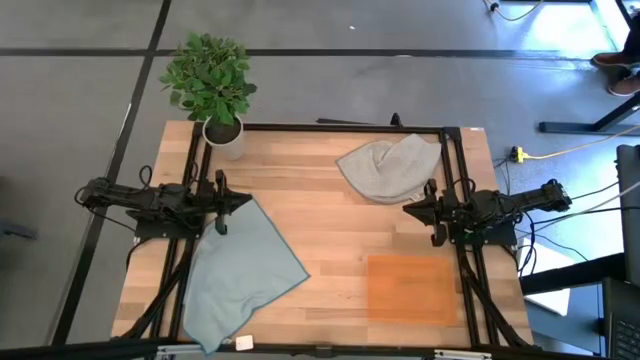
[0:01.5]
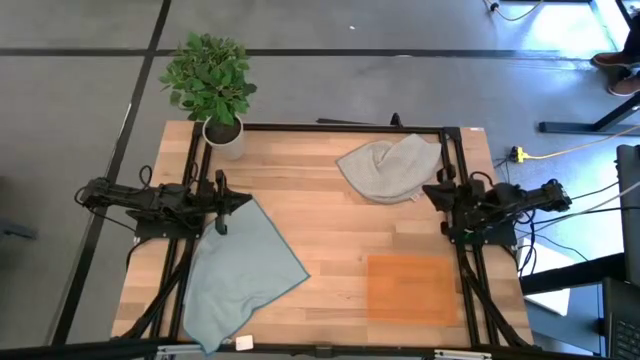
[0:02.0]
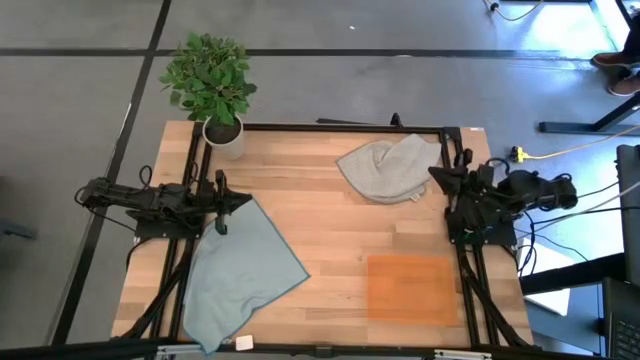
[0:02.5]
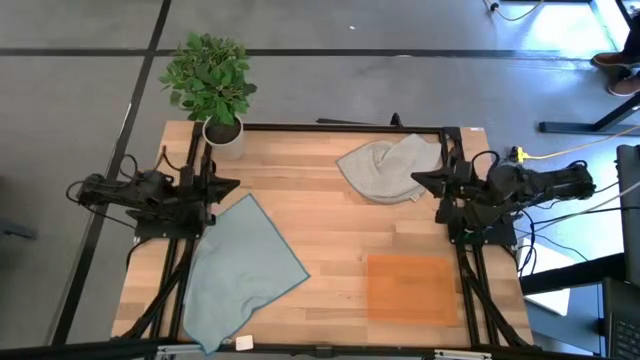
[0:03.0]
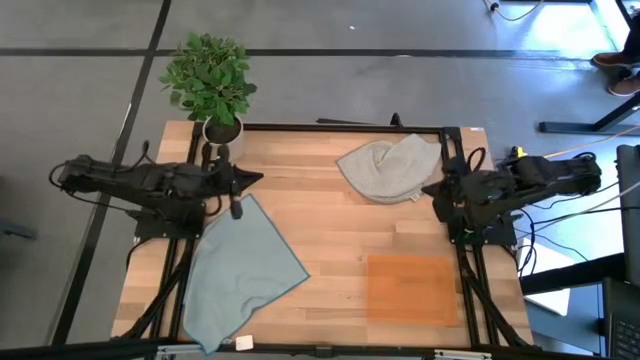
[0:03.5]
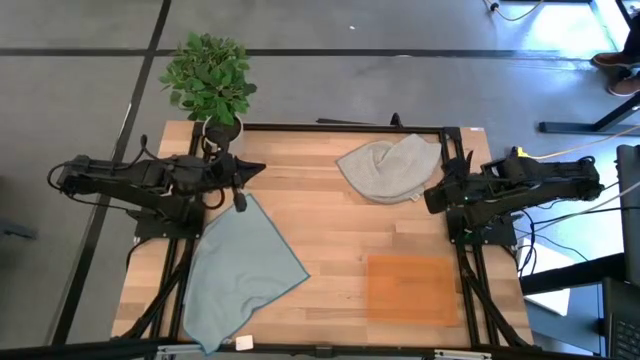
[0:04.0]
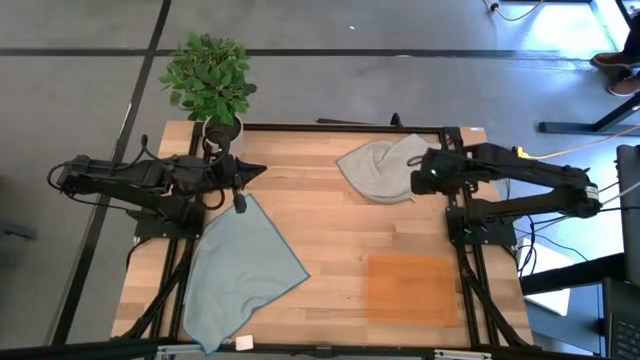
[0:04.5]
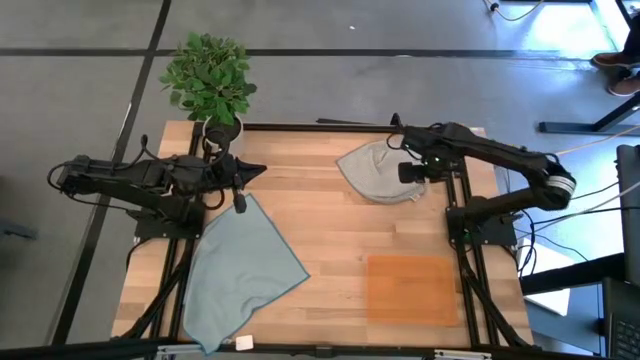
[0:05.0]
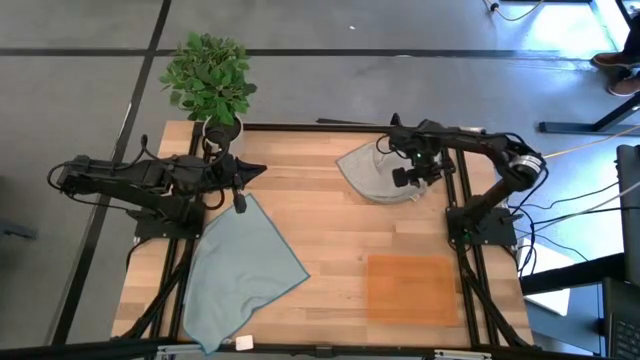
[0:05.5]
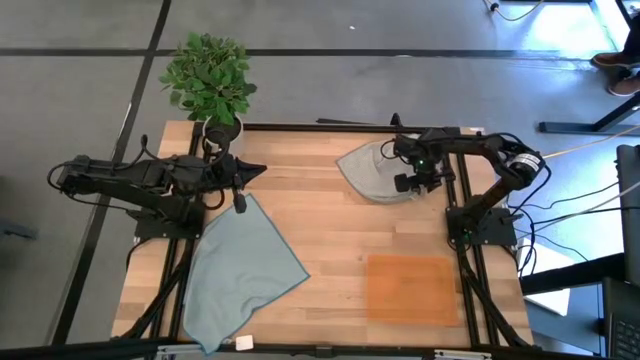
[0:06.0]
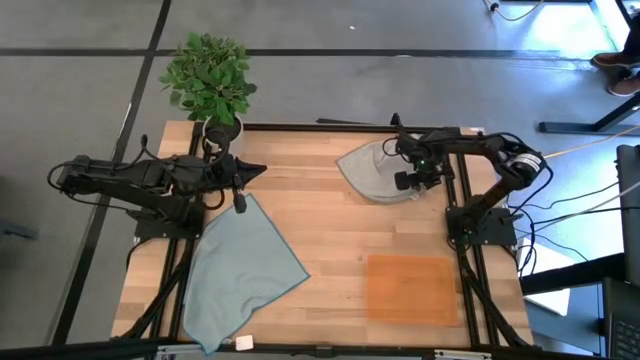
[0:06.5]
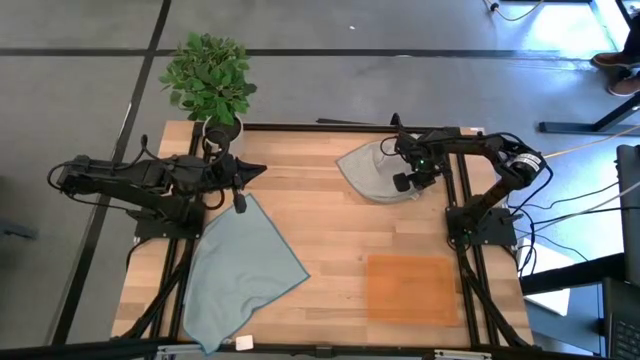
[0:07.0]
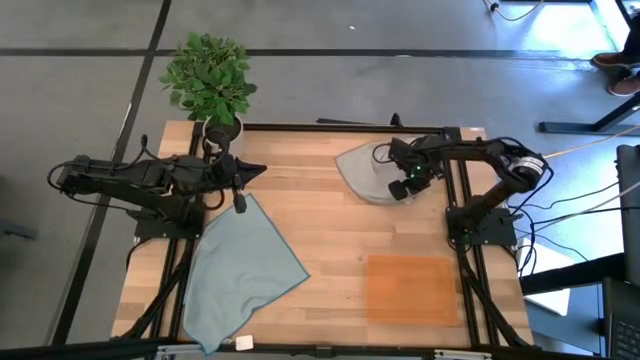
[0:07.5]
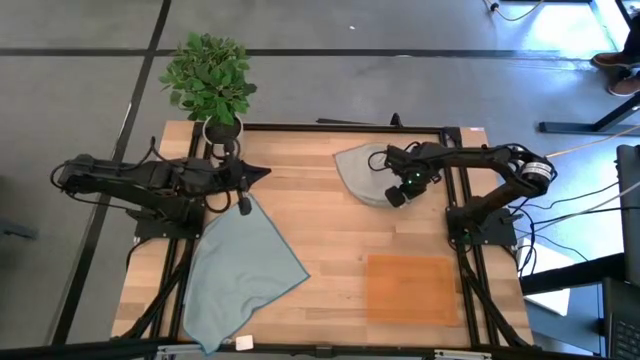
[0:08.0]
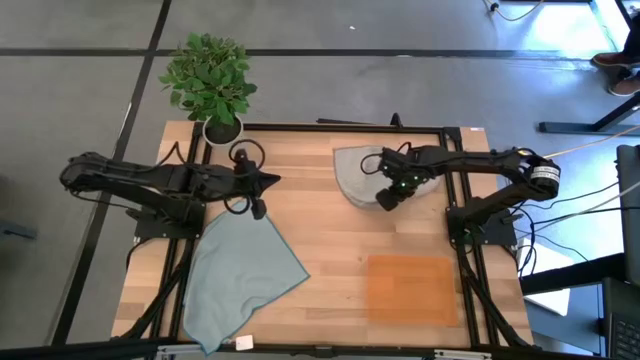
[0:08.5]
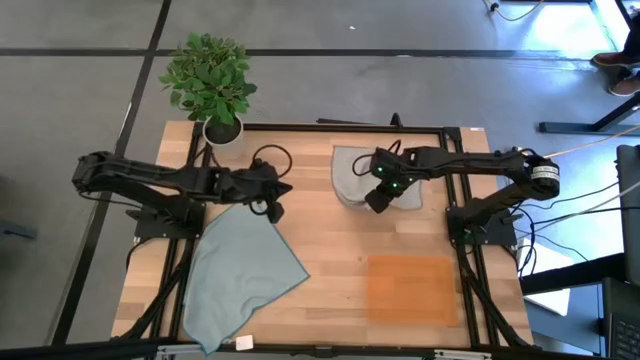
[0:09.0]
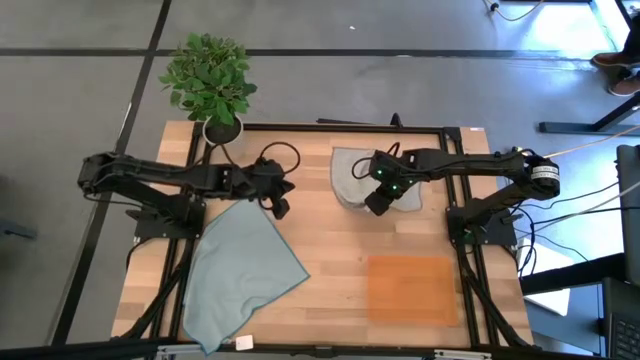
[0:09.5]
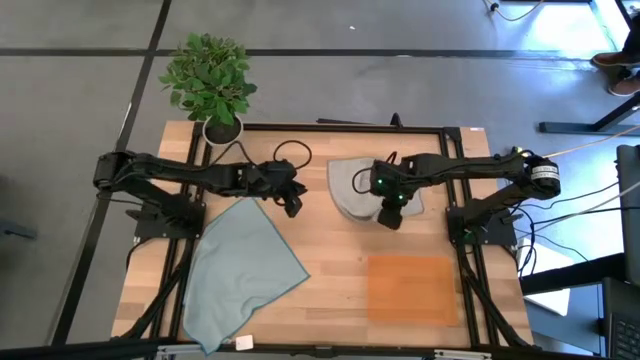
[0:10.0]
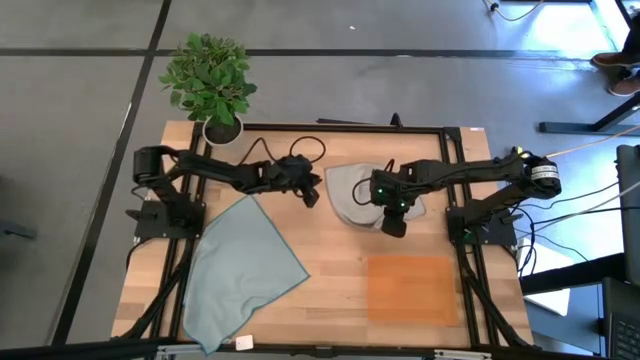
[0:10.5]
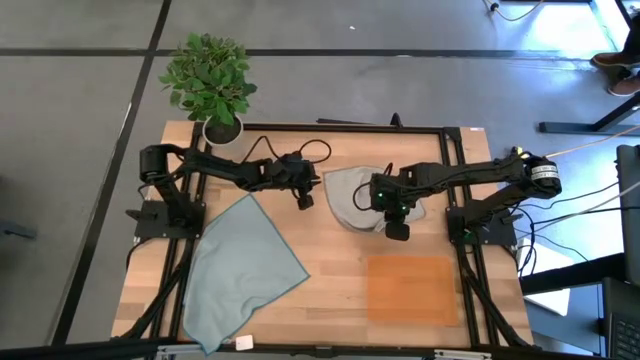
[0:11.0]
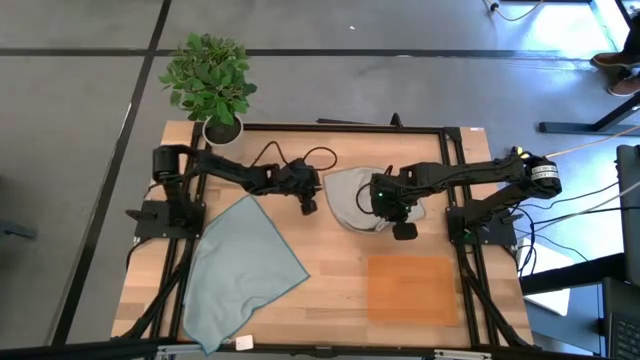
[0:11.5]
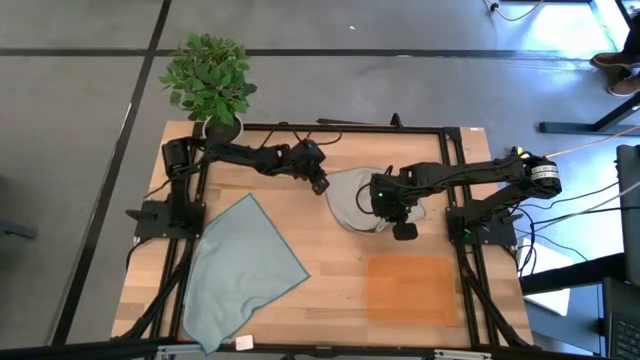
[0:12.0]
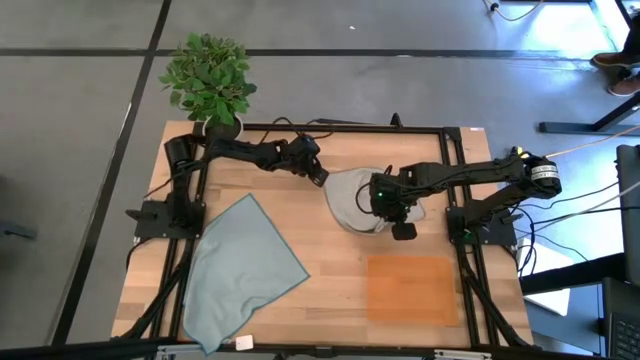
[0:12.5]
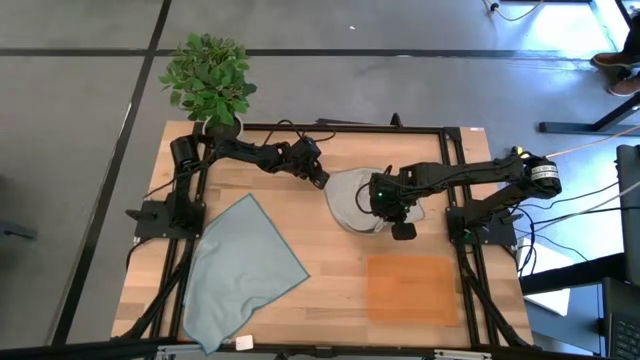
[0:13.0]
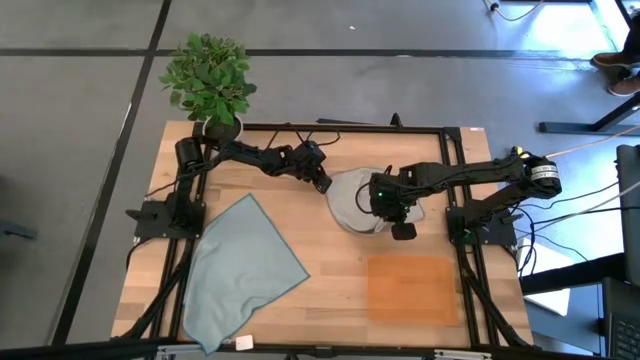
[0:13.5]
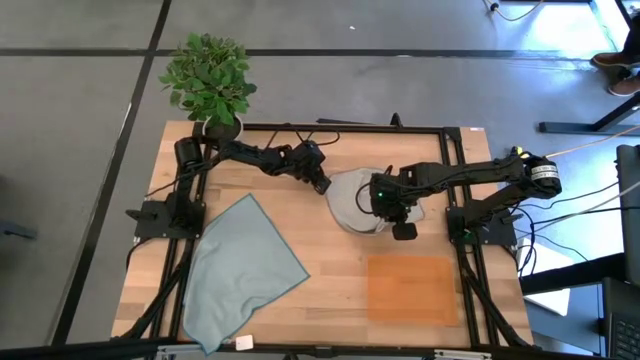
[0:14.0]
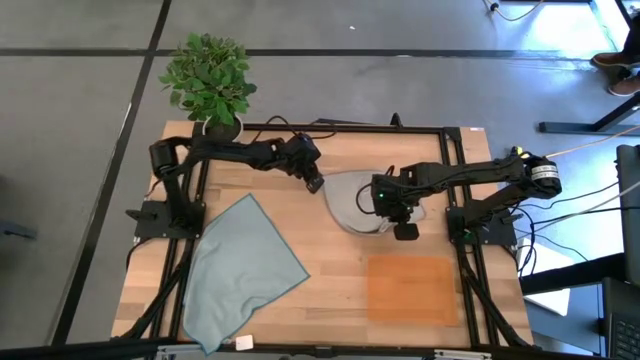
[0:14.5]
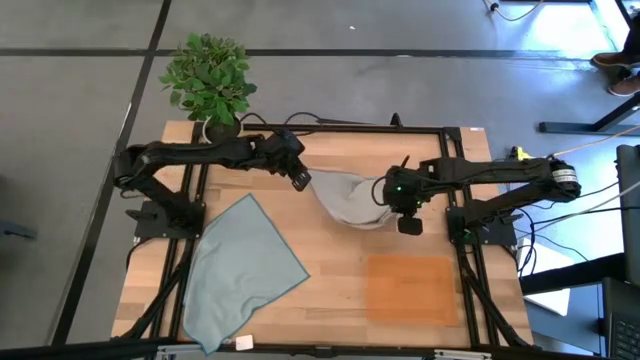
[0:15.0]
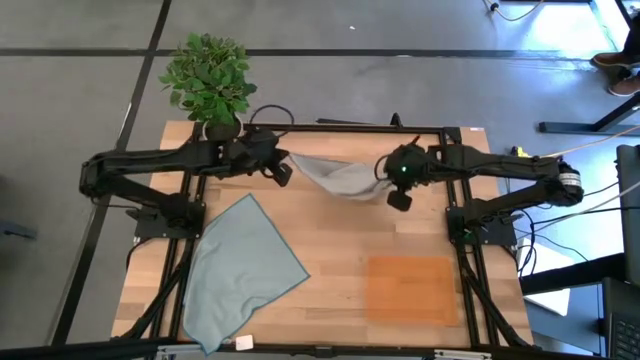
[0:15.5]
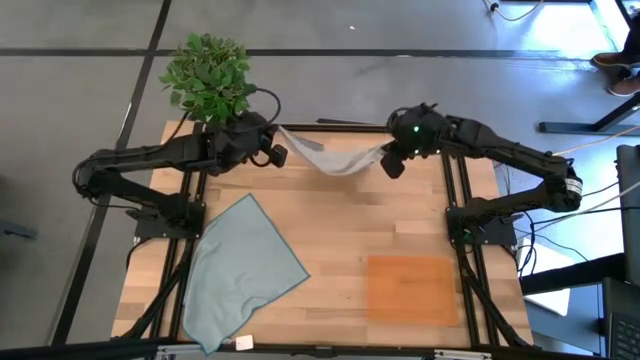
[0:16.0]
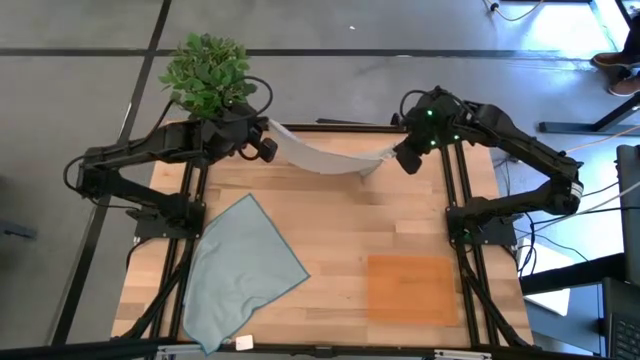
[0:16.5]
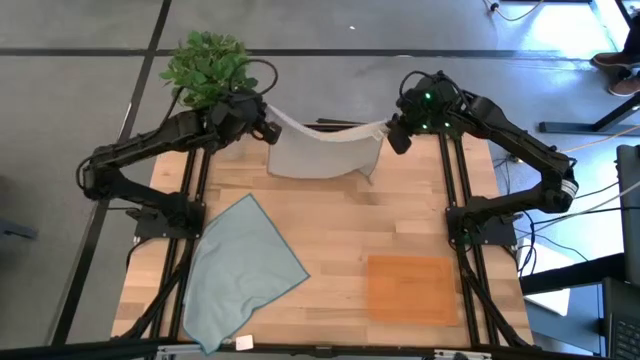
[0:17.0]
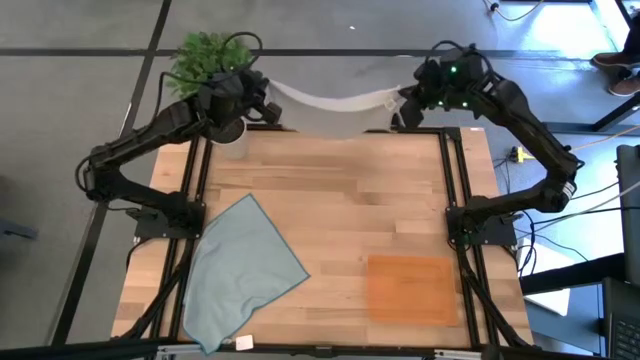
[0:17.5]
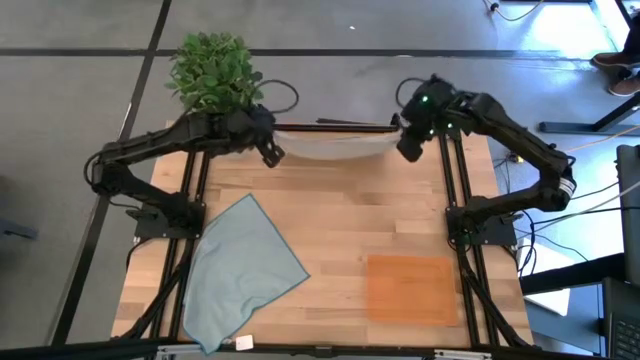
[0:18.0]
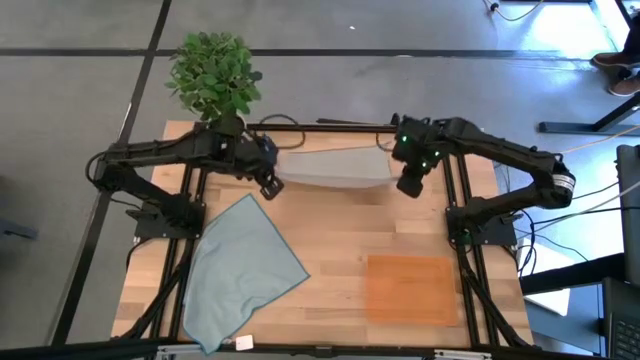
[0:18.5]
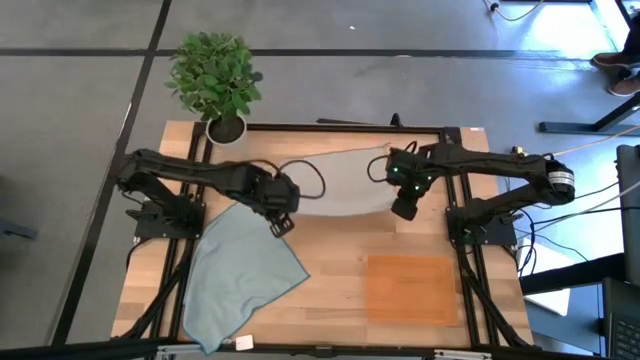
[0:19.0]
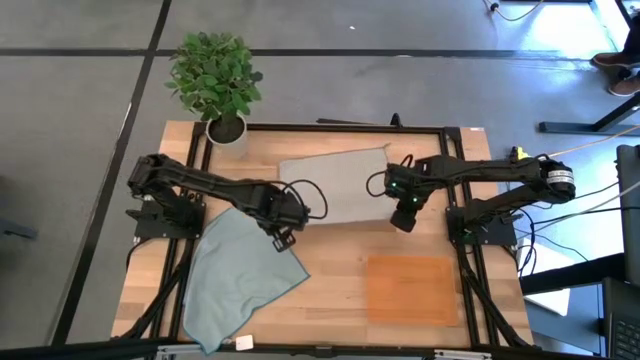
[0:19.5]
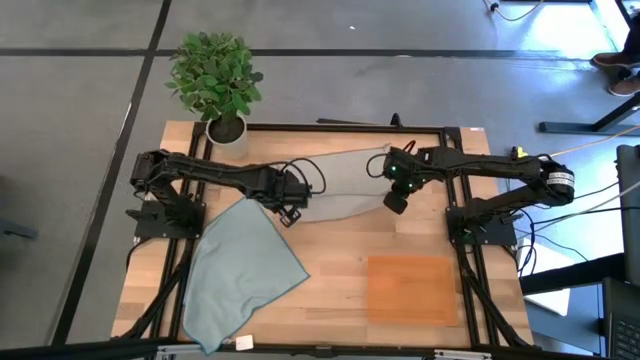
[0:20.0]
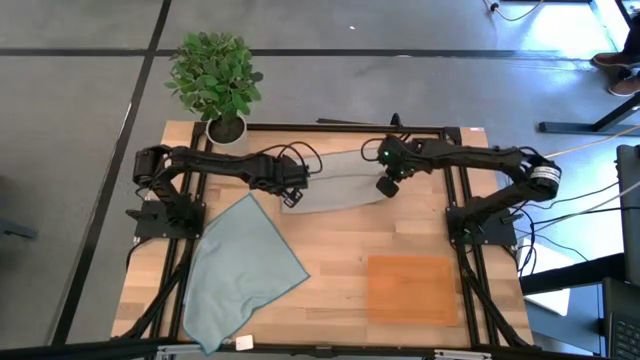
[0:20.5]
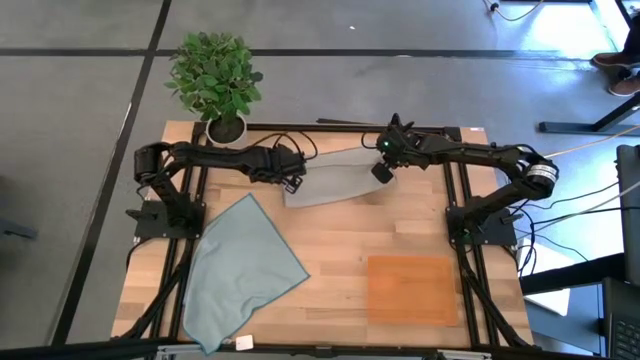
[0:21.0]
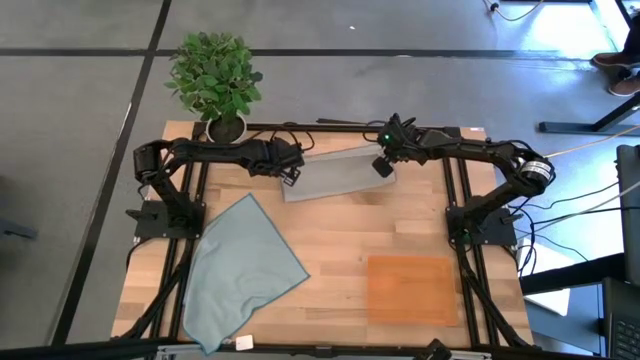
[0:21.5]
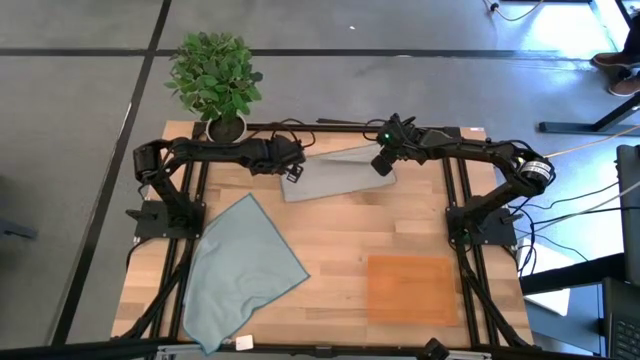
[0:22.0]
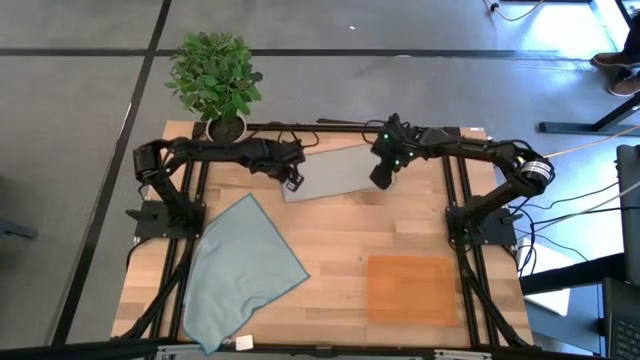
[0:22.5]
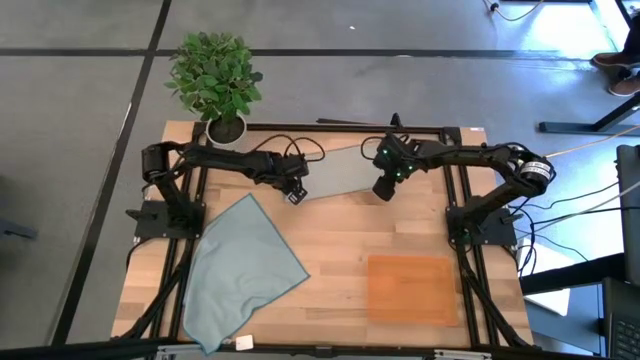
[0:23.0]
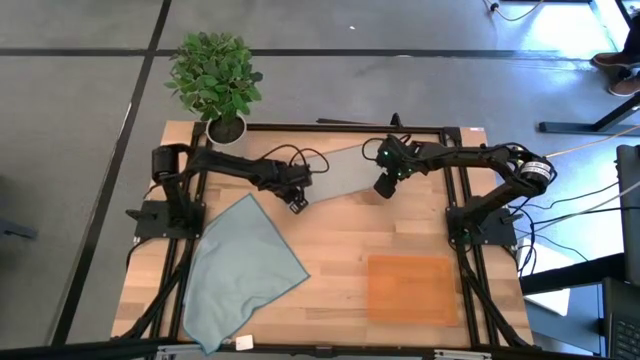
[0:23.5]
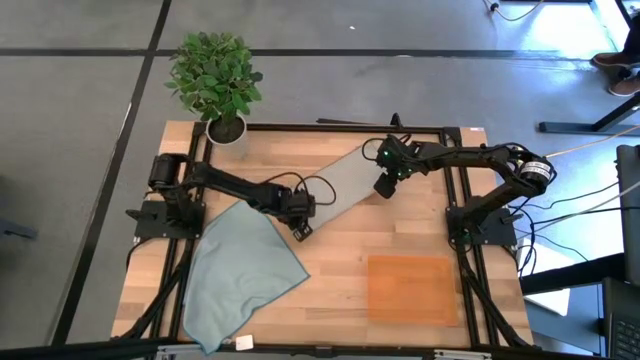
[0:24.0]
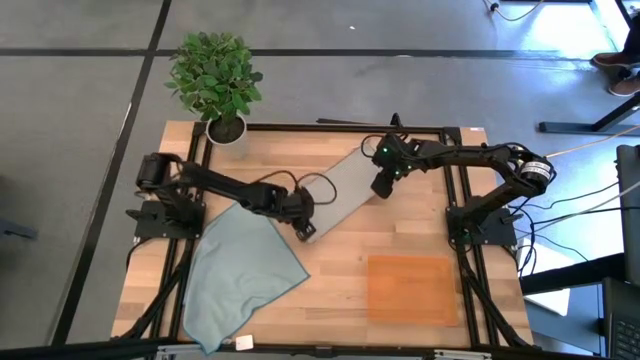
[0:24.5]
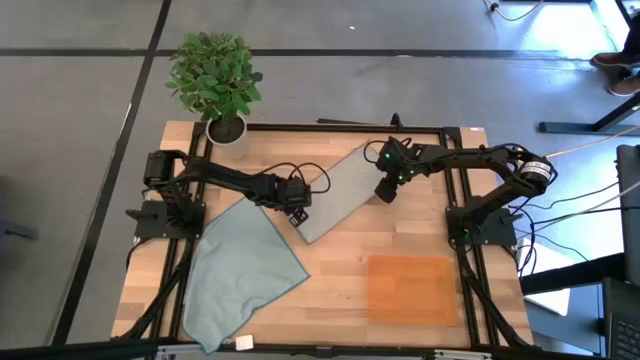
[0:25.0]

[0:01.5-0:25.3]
Task: Roll microfiber towels into tight, uniform cylinder then place into a basket
Roll the gray microfiber towel
